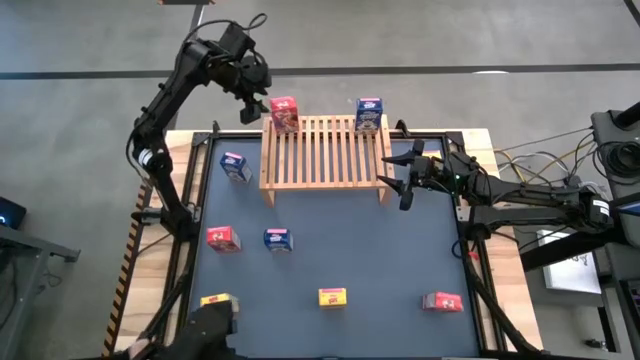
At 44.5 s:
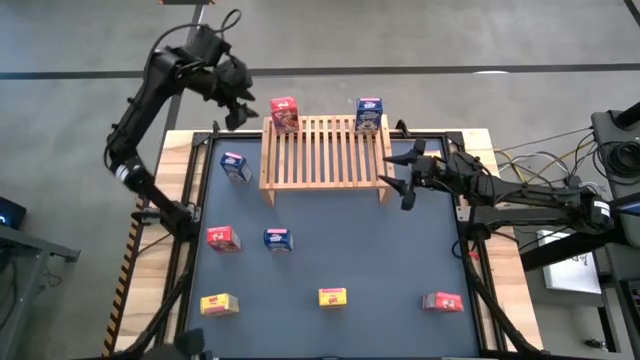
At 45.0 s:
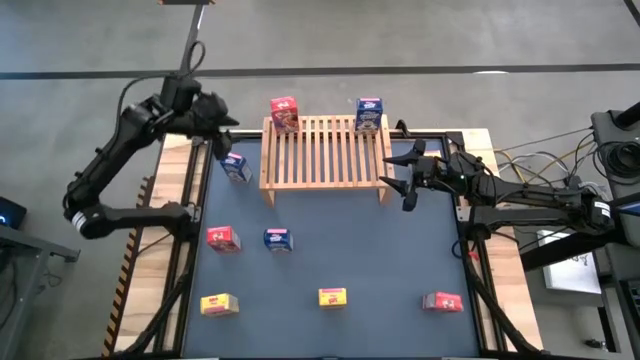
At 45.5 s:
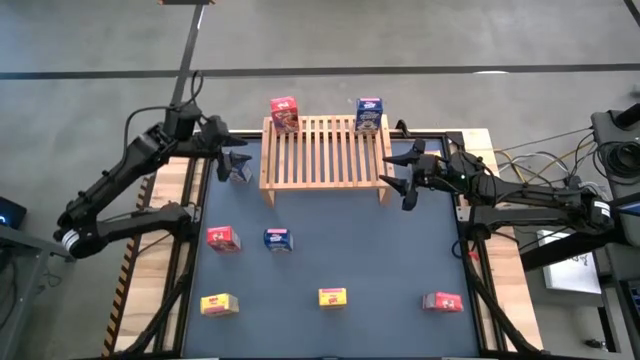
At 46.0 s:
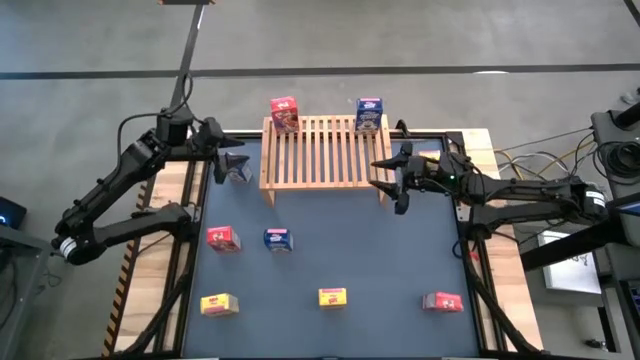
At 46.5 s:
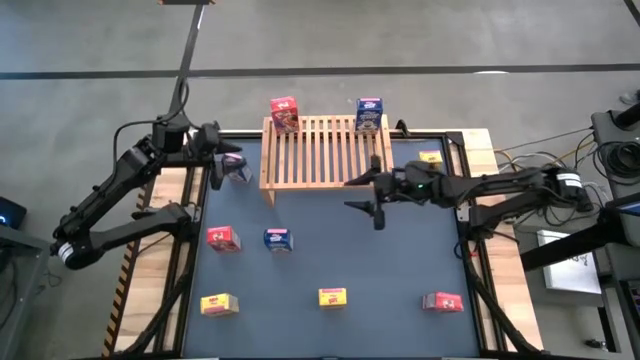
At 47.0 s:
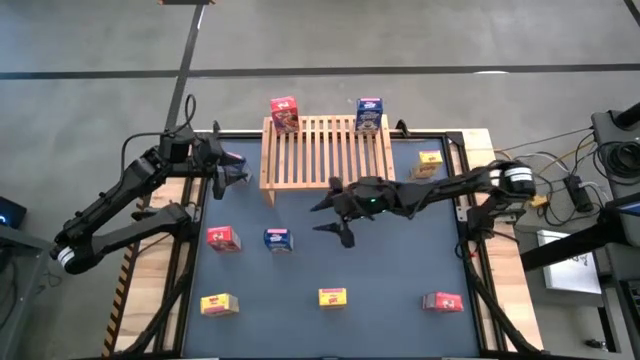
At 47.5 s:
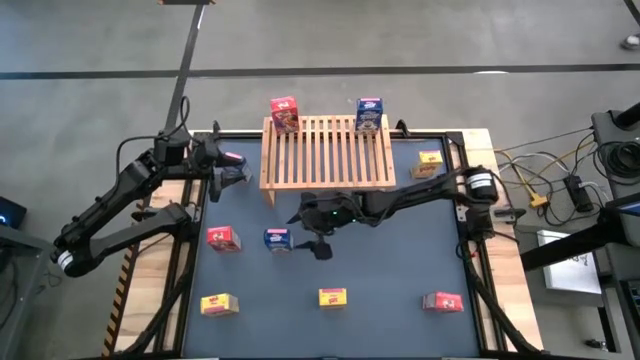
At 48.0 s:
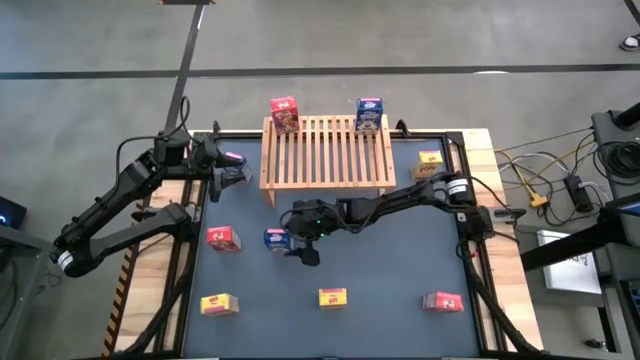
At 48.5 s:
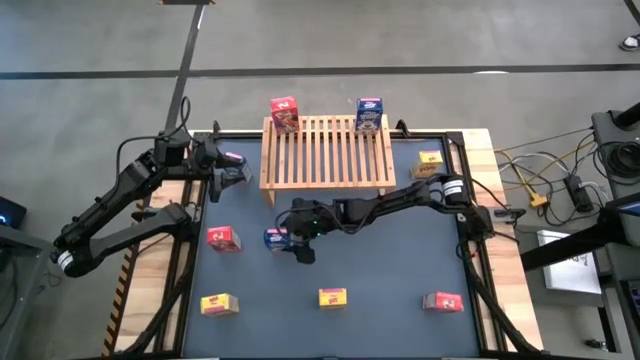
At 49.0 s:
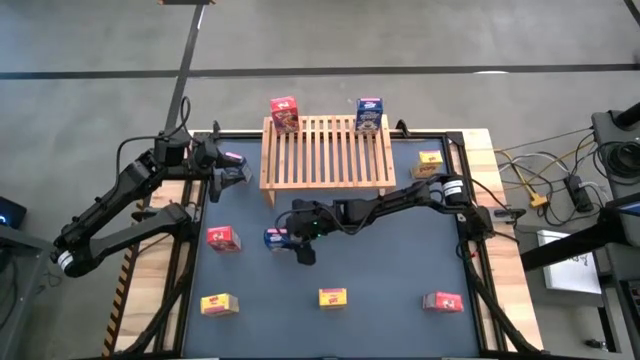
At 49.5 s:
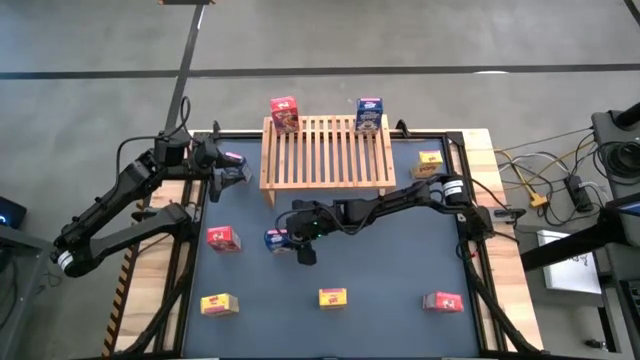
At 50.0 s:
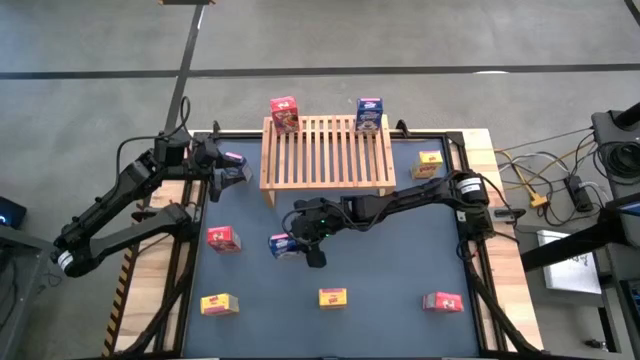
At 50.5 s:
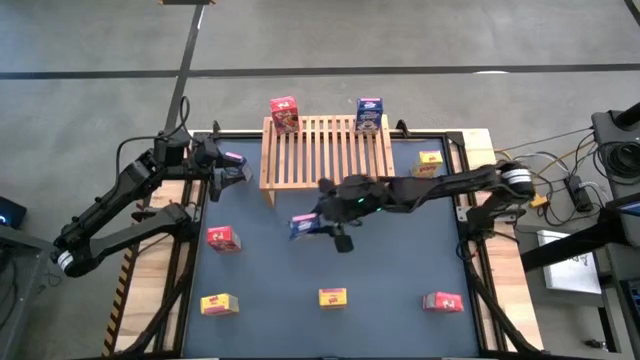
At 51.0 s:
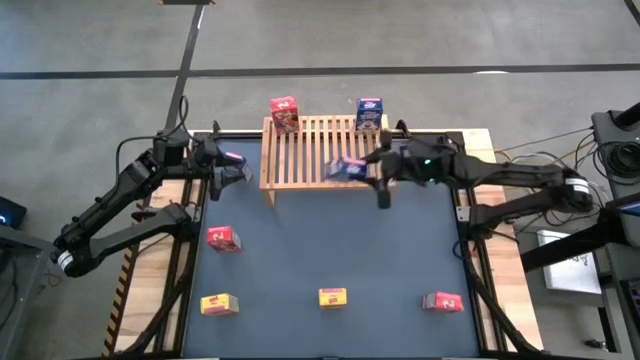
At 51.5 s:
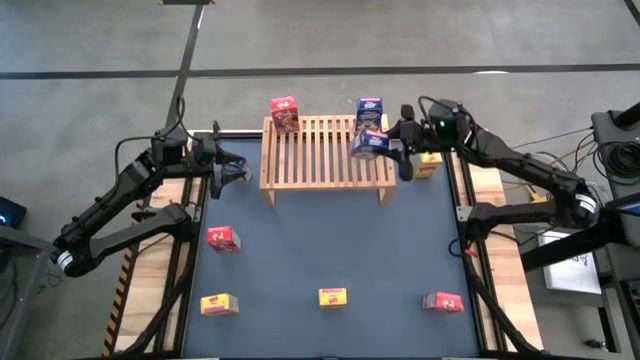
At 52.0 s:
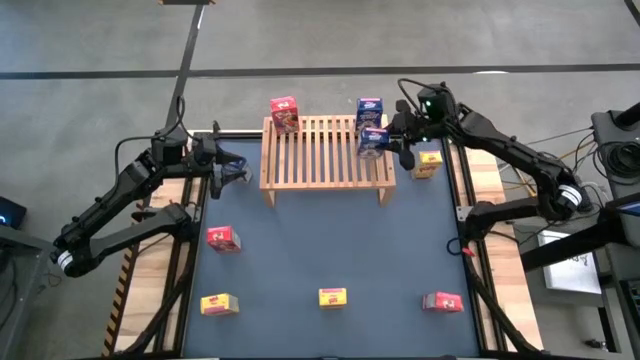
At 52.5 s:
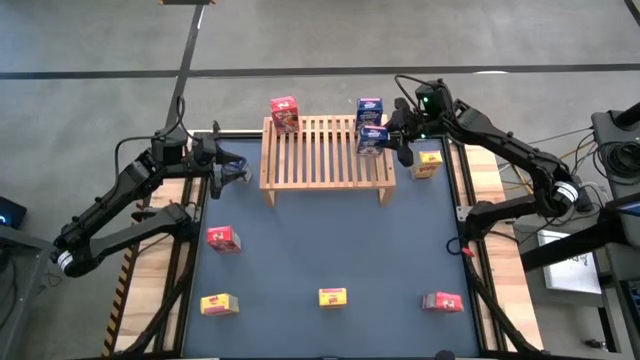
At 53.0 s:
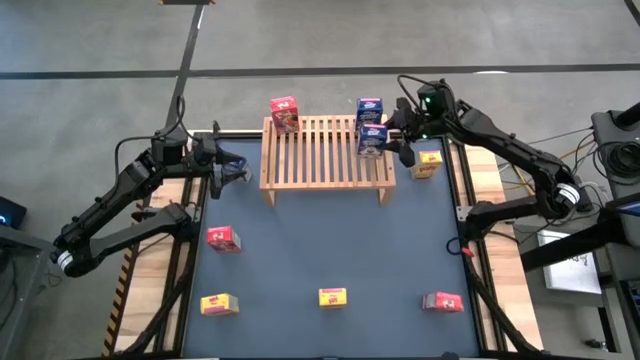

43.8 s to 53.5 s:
Task: Stack cereal on shelf
Put the bottom blue cereal box on the shelf aligned with the blue cereal box

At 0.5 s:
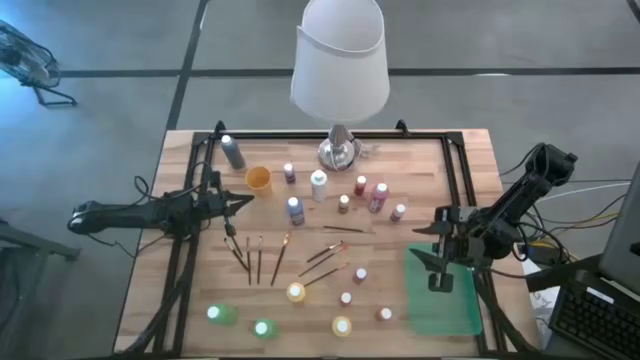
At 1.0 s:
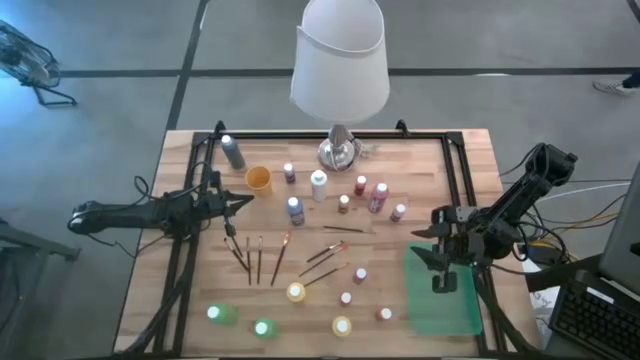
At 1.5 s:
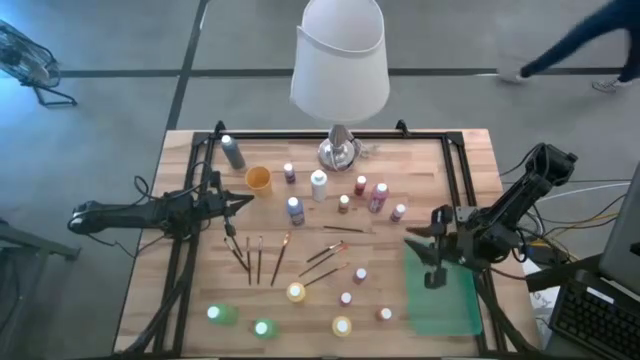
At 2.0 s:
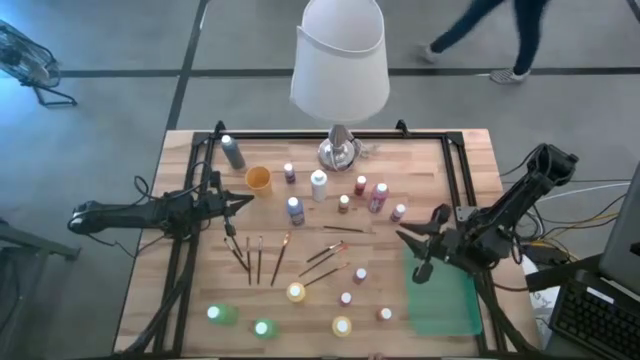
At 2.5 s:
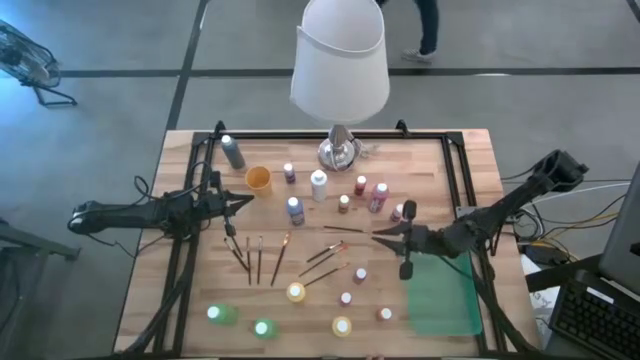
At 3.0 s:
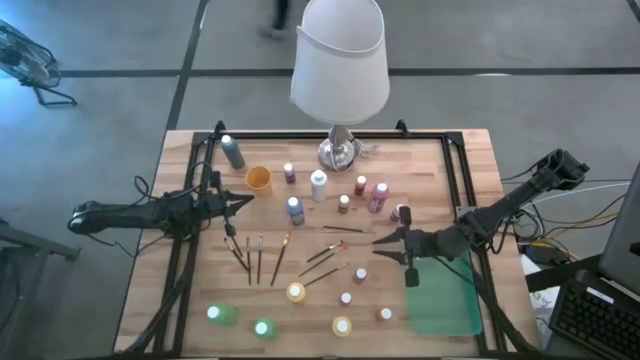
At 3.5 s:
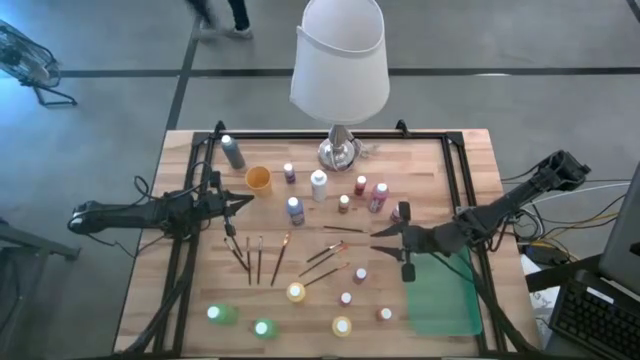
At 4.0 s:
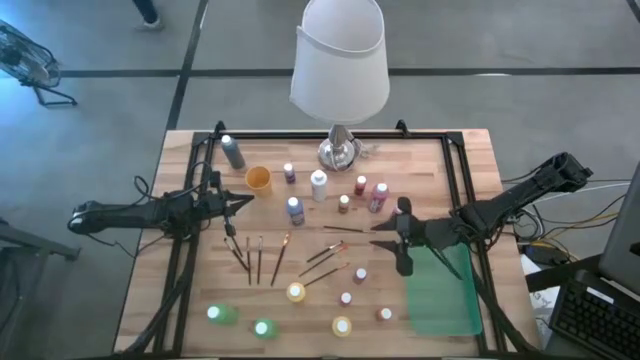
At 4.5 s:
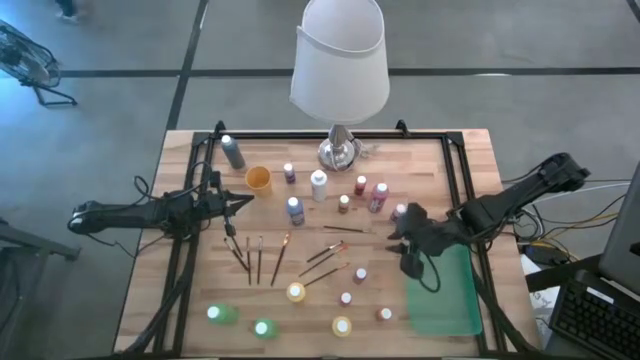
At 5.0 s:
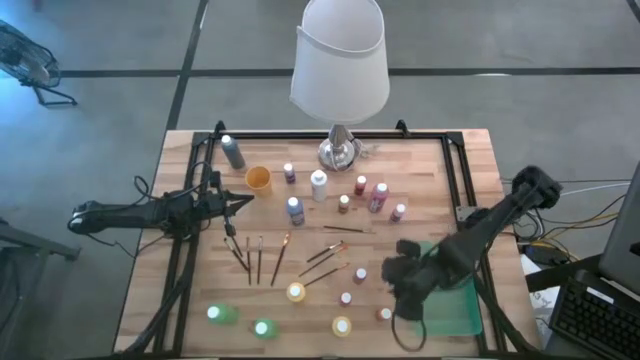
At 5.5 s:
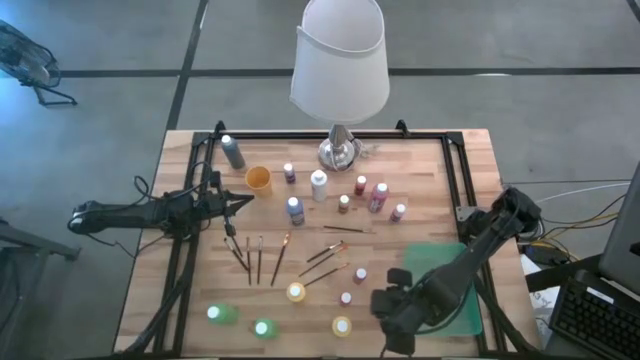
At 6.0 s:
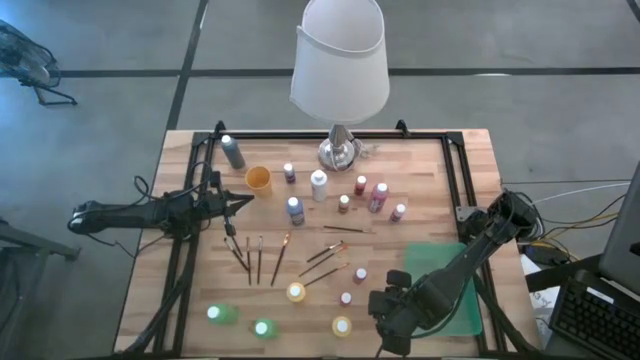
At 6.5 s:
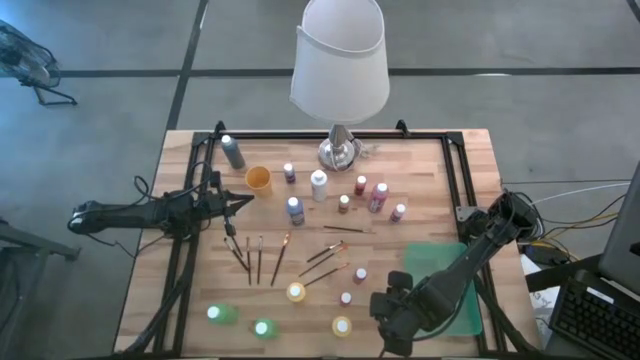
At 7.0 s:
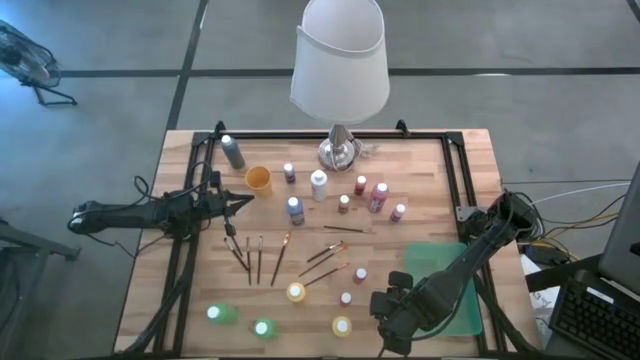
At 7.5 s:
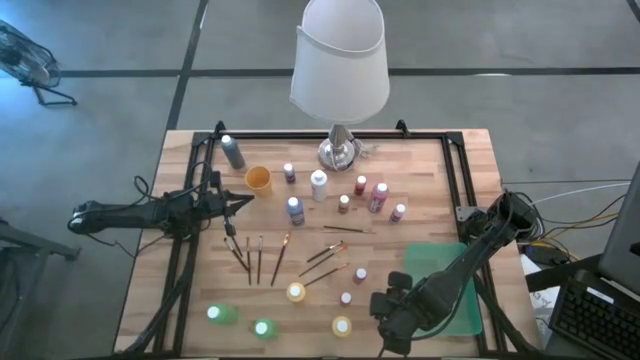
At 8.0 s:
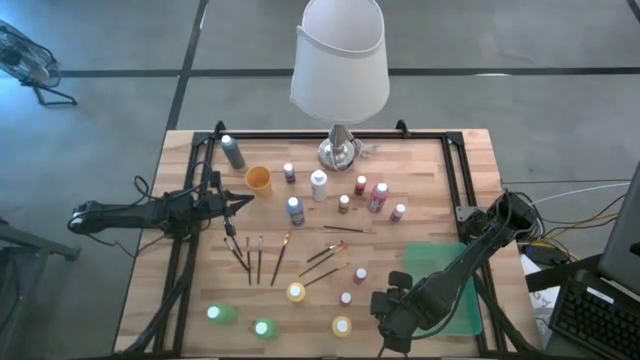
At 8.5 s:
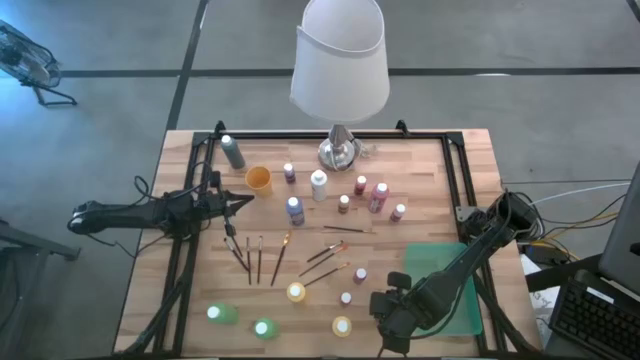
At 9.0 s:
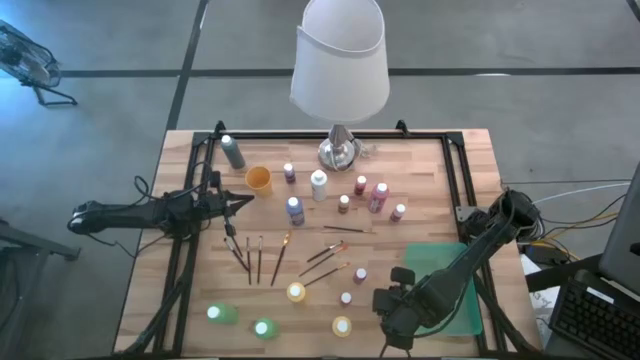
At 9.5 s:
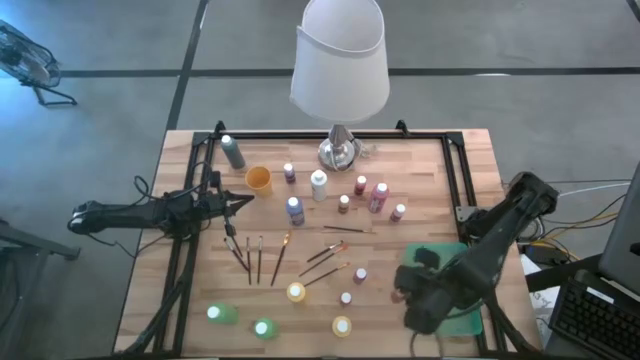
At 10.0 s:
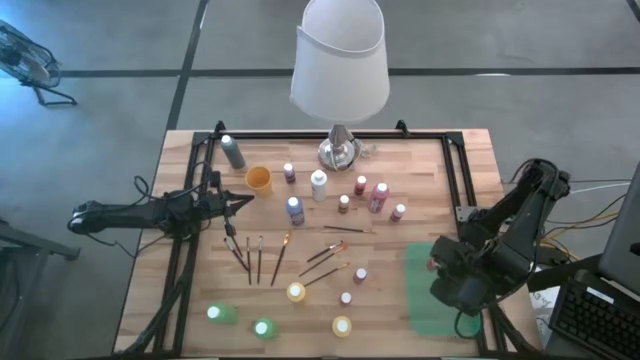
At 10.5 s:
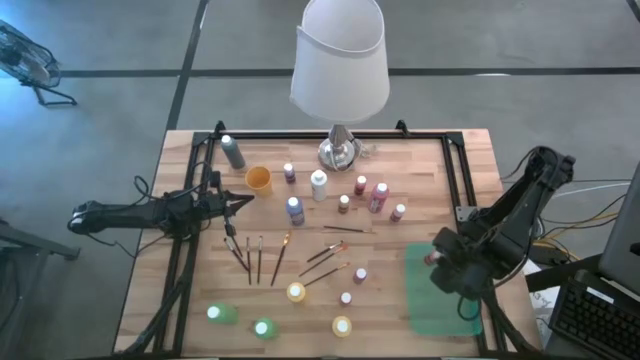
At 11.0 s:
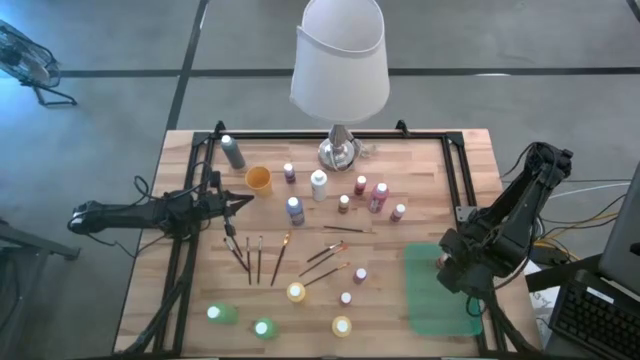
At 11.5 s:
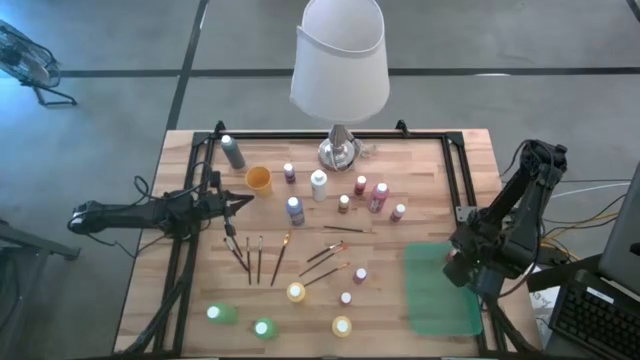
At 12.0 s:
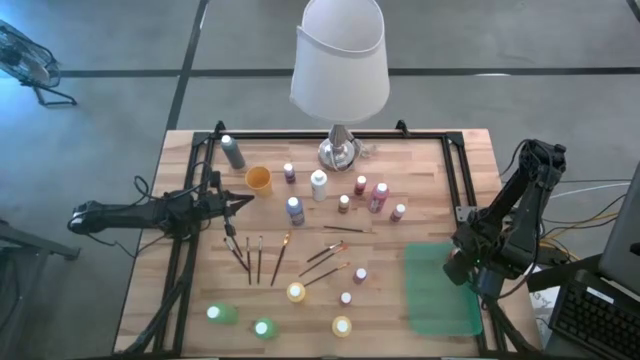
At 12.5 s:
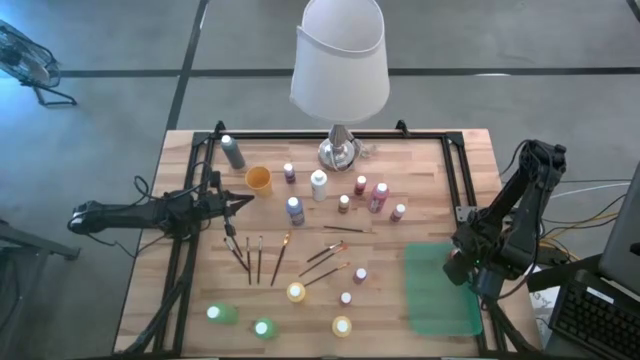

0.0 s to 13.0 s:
Task: Pick & Place Paint Supplies
Put the orange paint bottle into the the green bin
